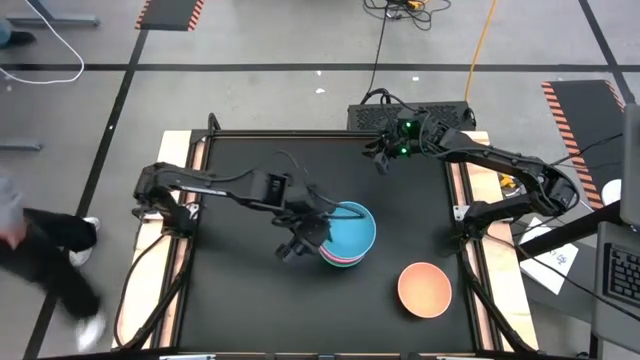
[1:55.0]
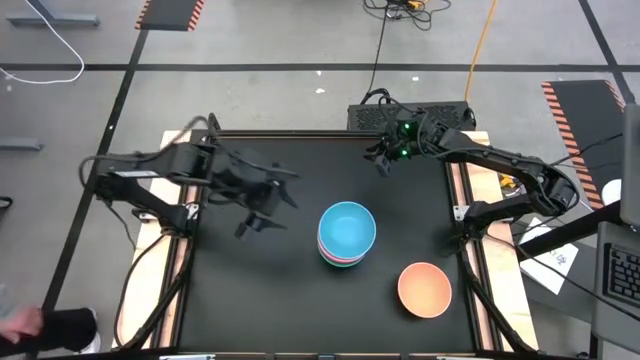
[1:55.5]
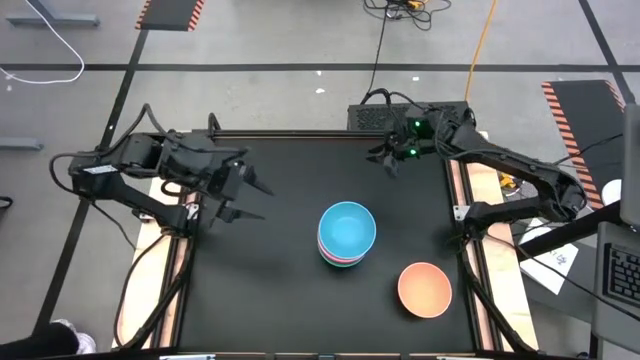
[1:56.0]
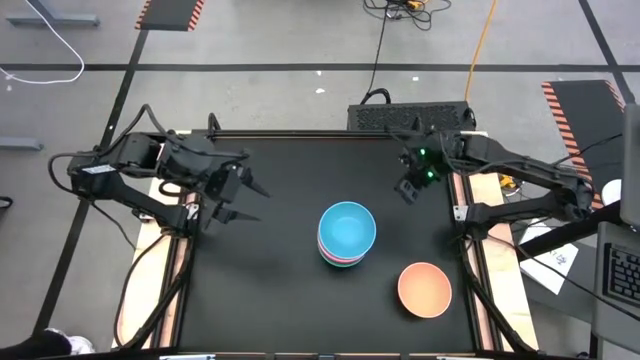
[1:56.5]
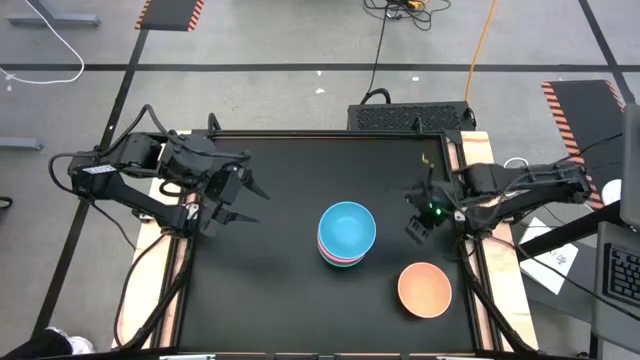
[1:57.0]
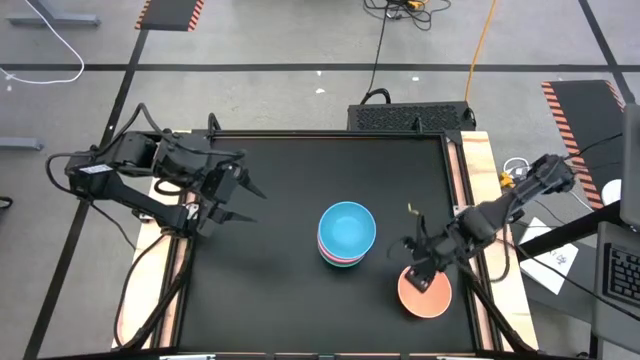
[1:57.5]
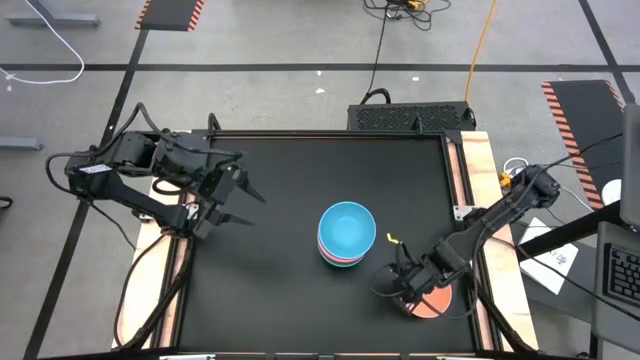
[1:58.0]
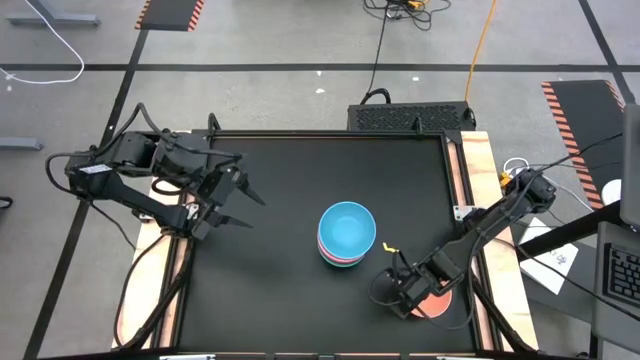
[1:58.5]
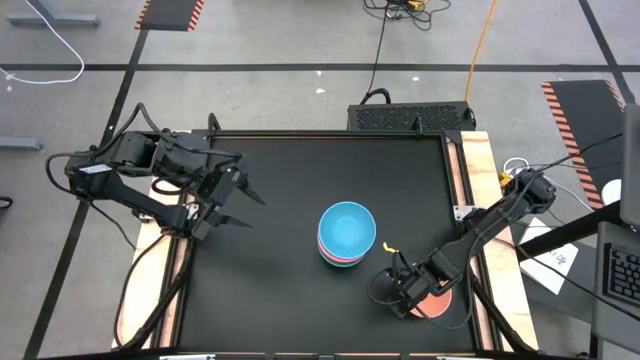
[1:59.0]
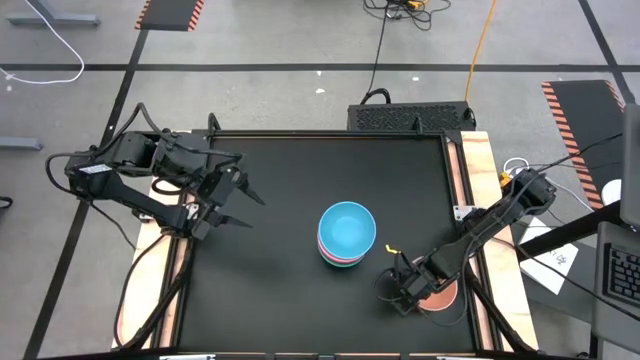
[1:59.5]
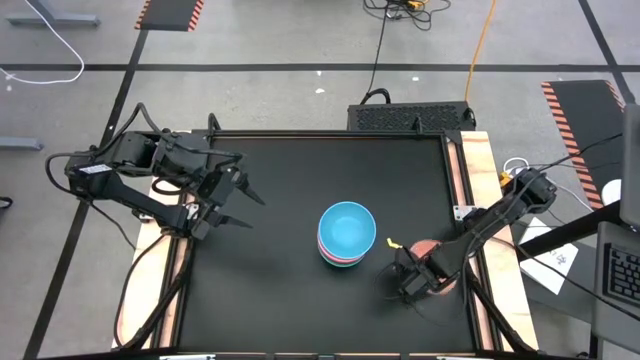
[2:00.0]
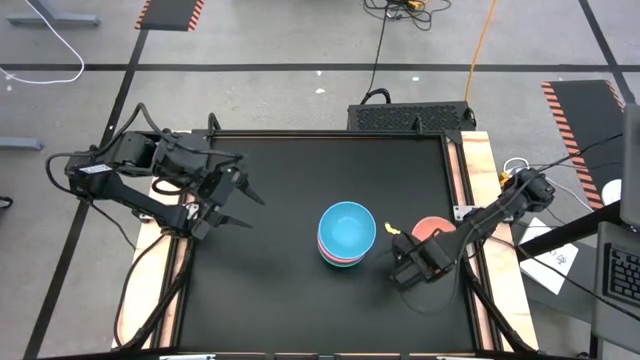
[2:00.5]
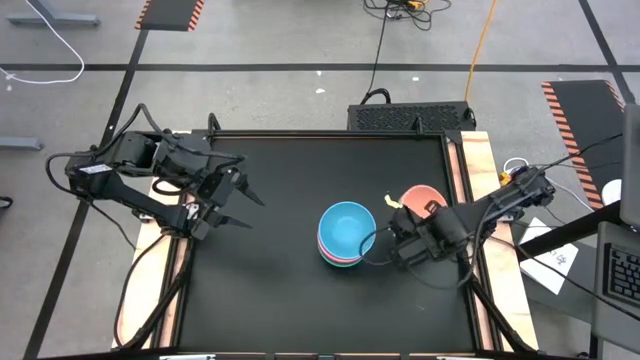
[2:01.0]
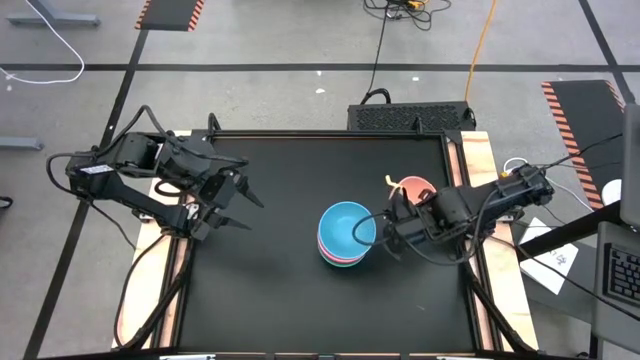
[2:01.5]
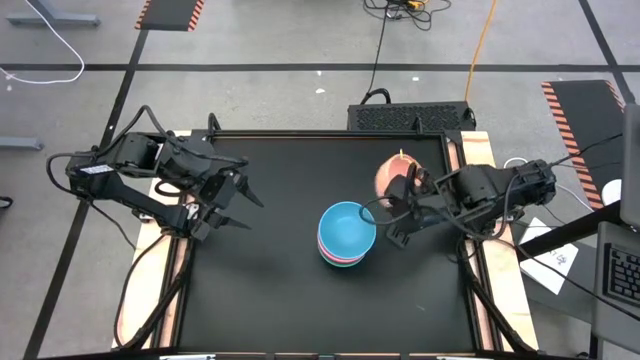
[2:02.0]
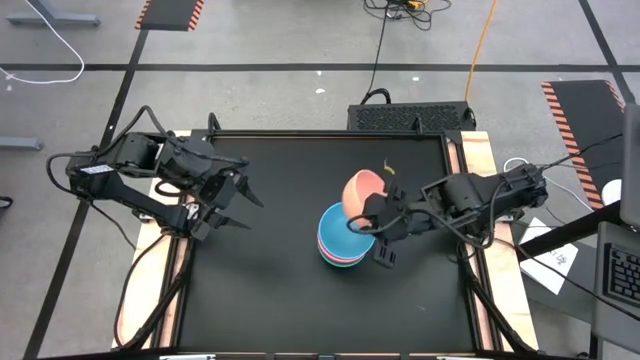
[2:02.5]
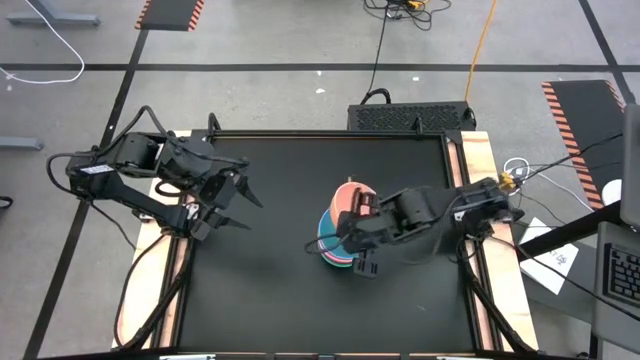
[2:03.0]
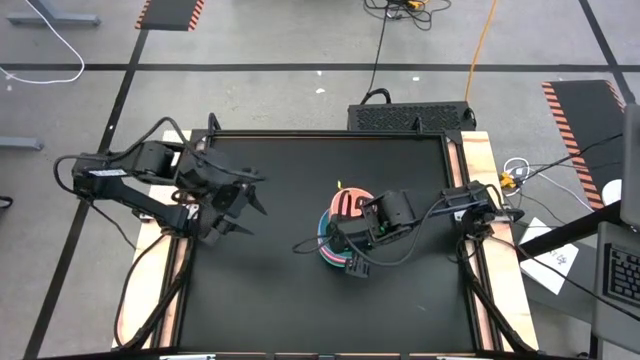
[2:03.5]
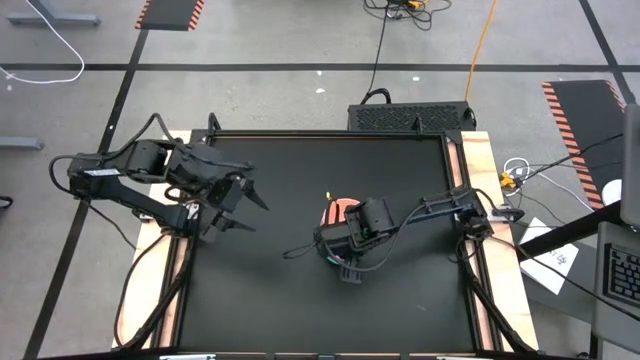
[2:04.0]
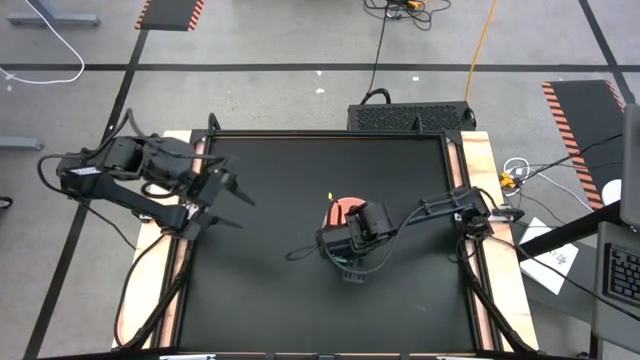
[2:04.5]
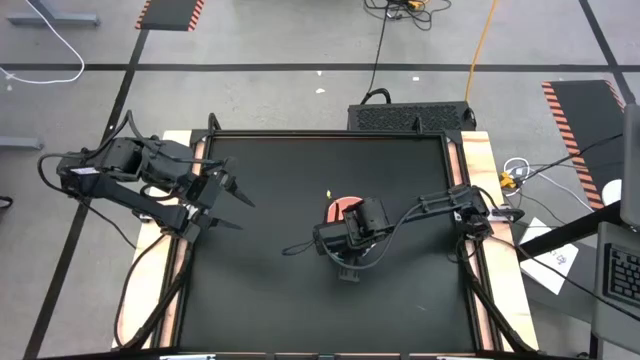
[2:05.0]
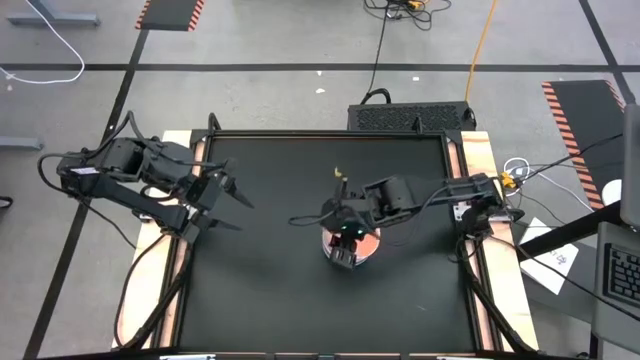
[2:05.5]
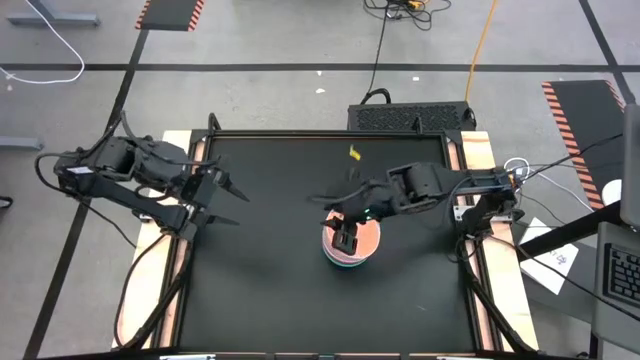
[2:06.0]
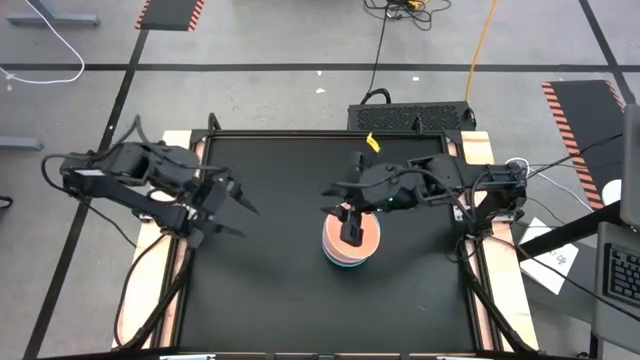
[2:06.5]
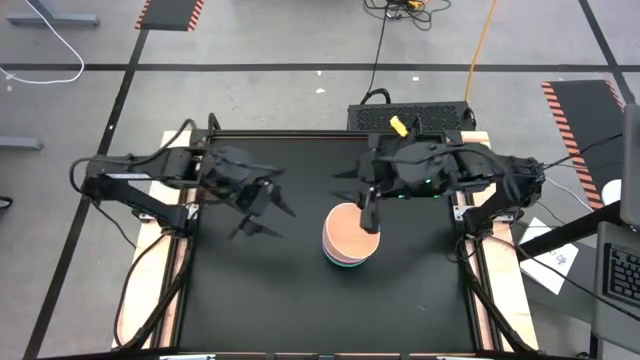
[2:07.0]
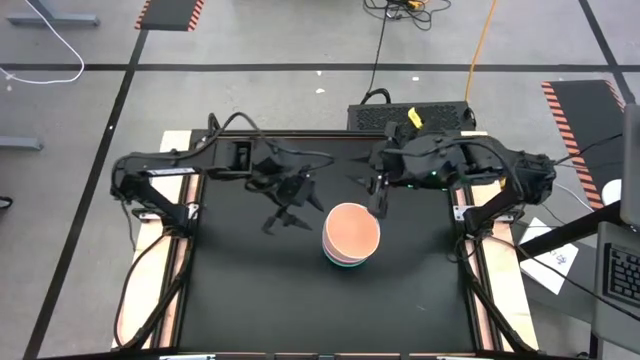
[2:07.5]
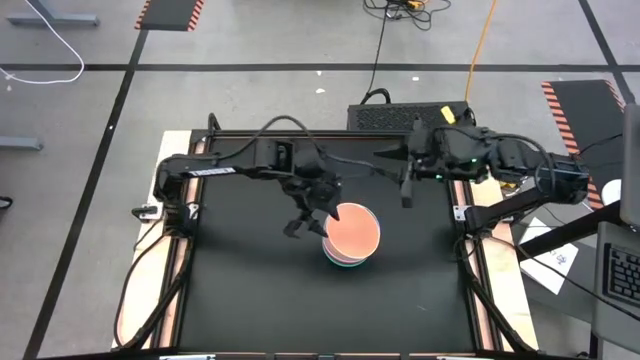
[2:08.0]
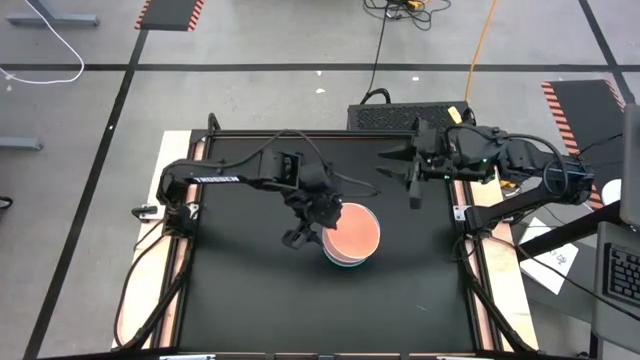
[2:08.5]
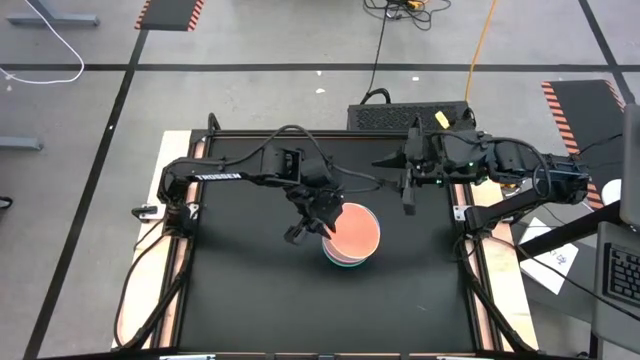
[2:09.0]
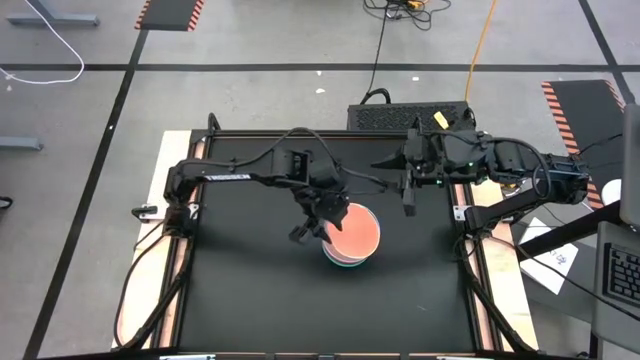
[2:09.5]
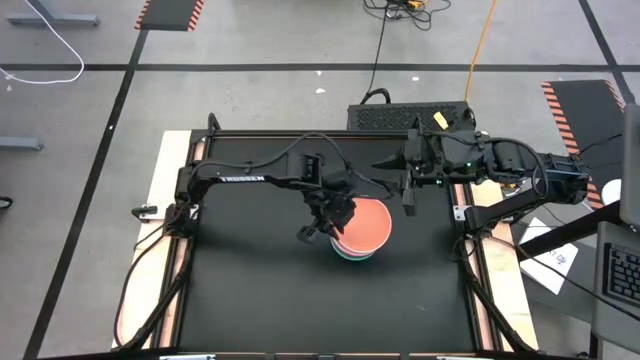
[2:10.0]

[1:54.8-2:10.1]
Task: Nest bowls inside each other
Stack the light orange bowl on the blue bowl

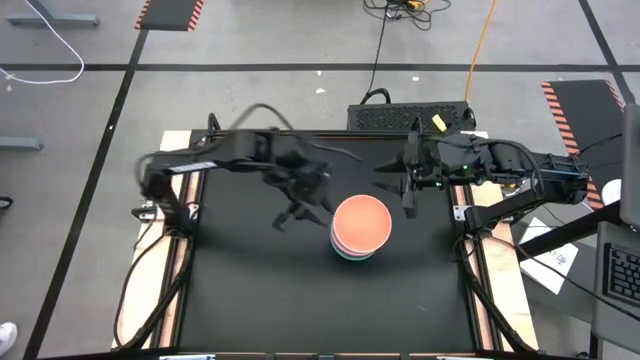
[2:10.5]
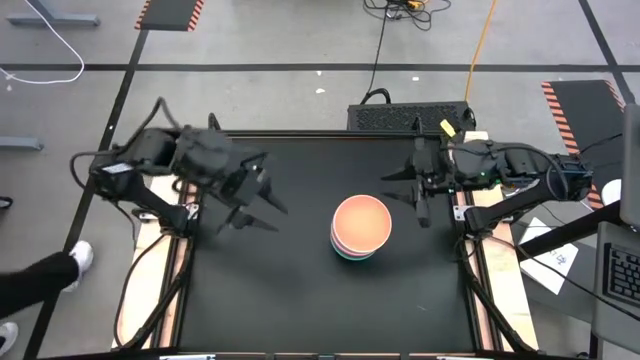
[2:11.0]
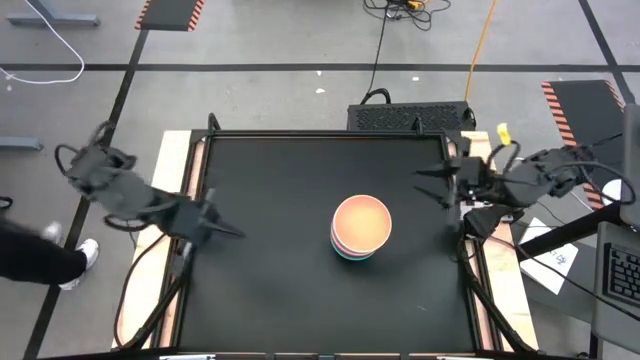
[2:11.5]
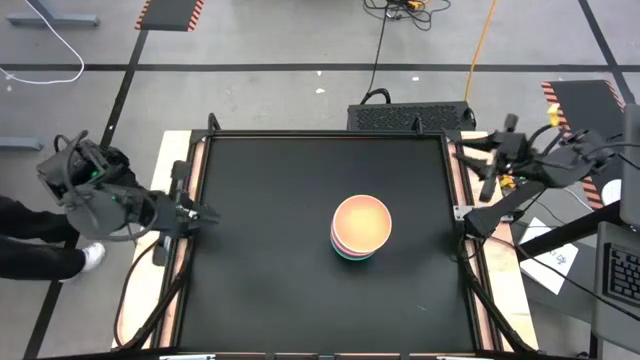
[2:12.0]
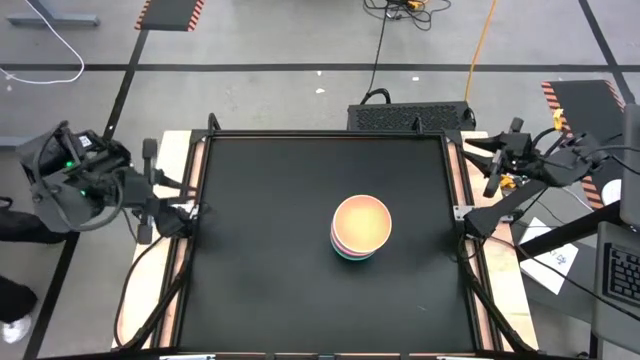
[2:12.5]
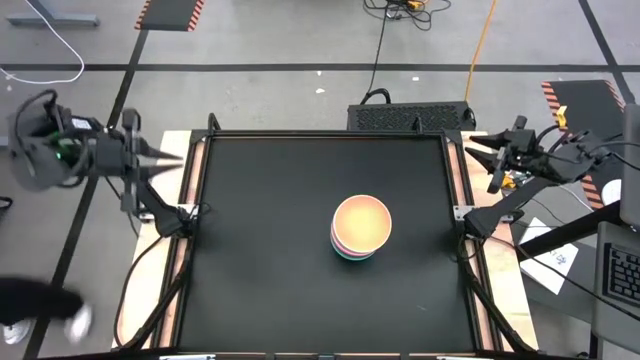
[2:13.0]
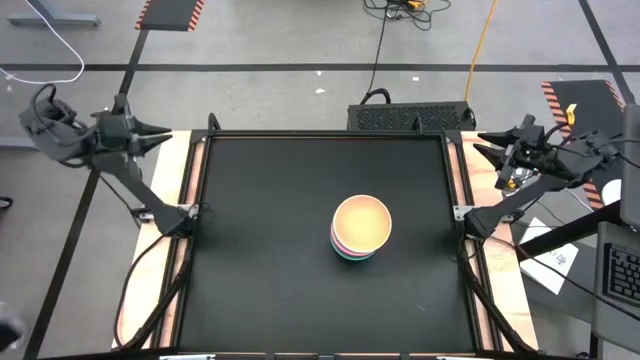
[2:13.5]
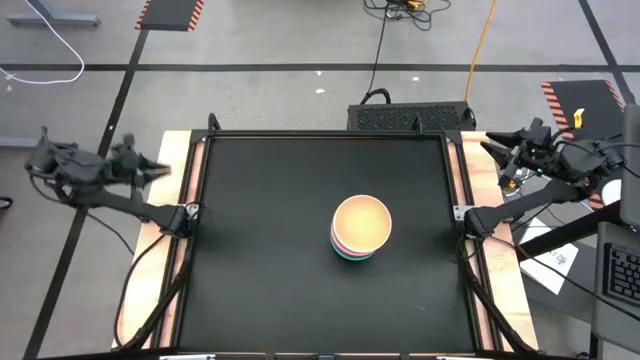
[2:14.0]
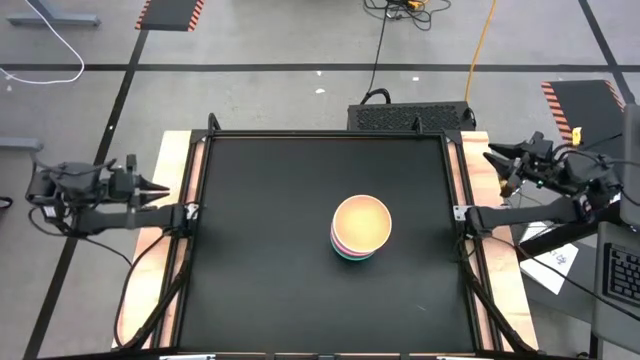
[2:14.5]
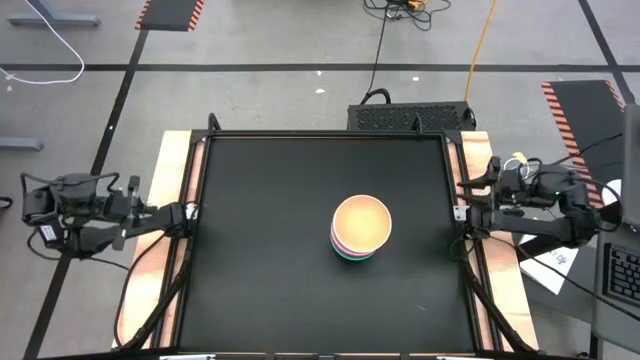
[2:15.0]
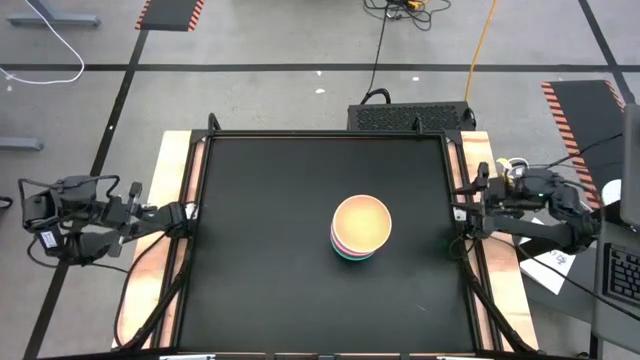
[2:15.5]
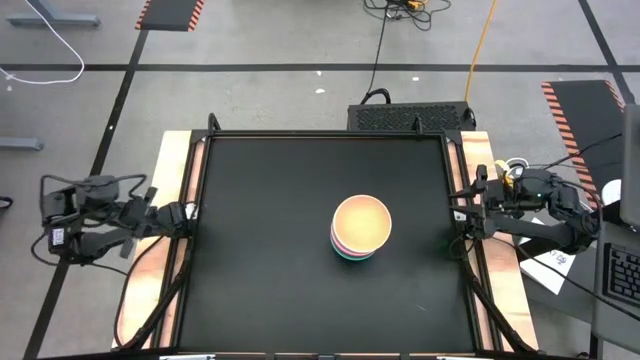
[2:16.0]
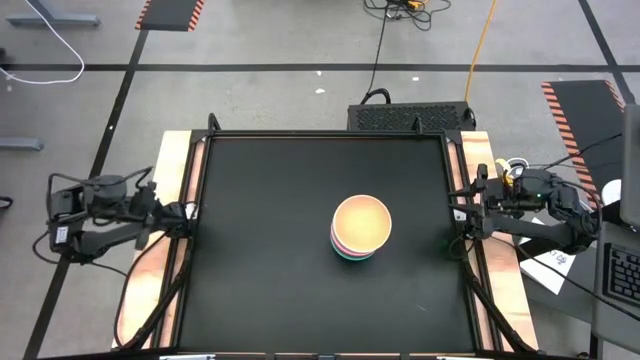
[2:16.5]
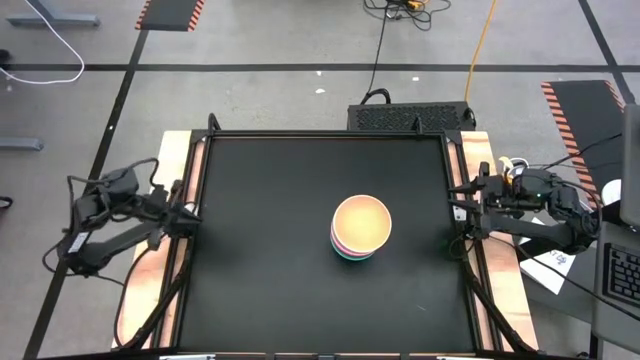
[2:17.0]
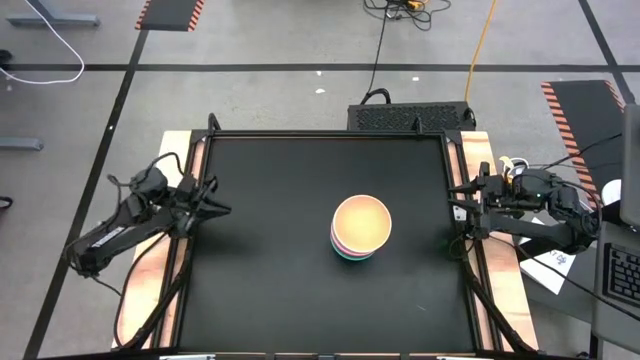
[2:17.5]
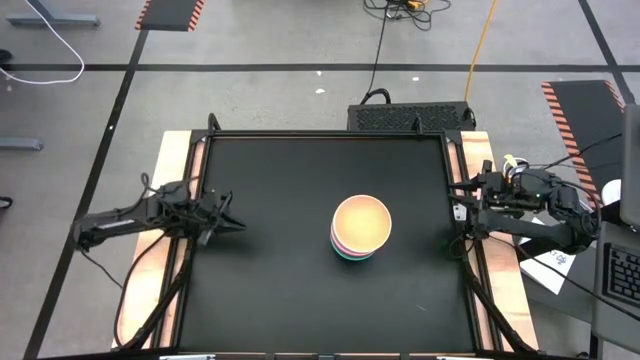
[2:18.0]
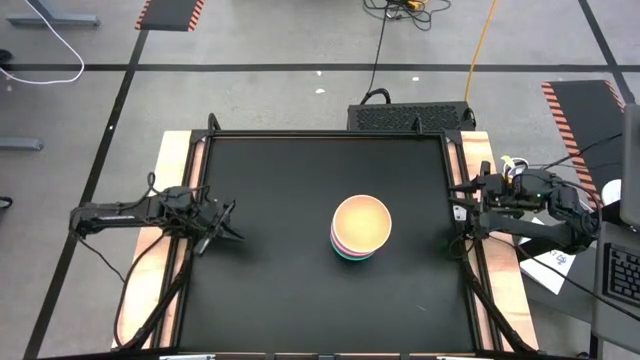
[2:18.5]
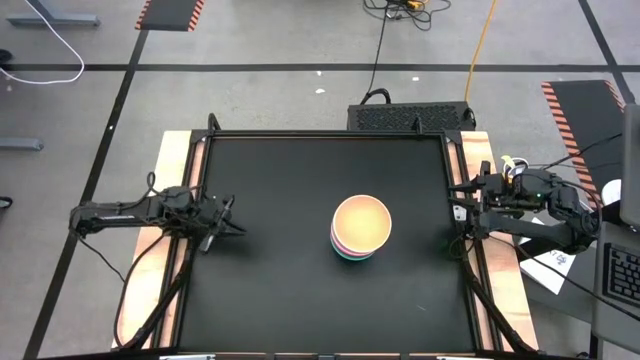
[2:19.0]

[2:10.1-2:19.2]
Return to Home Position
